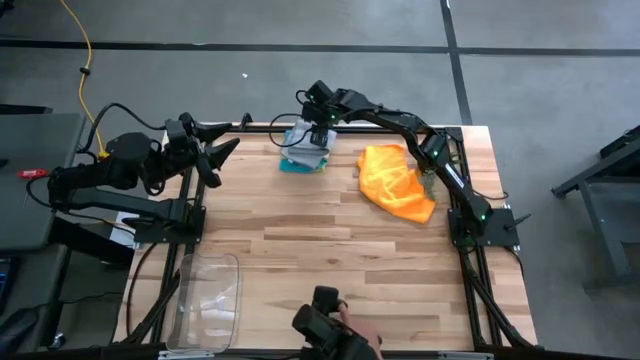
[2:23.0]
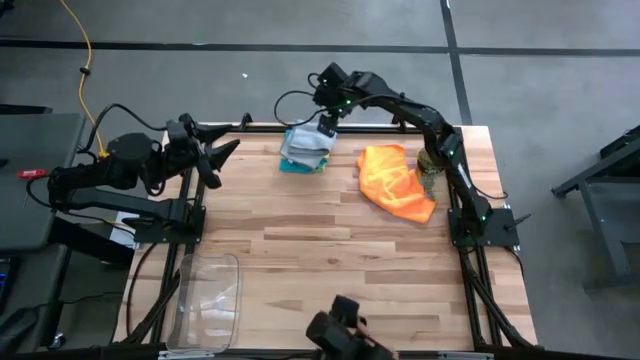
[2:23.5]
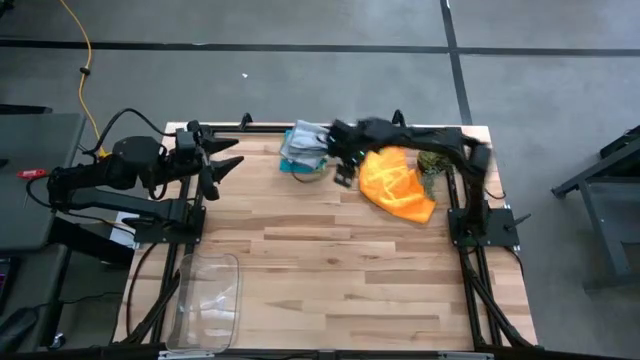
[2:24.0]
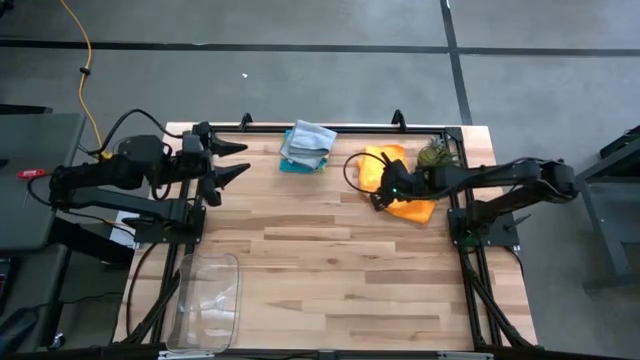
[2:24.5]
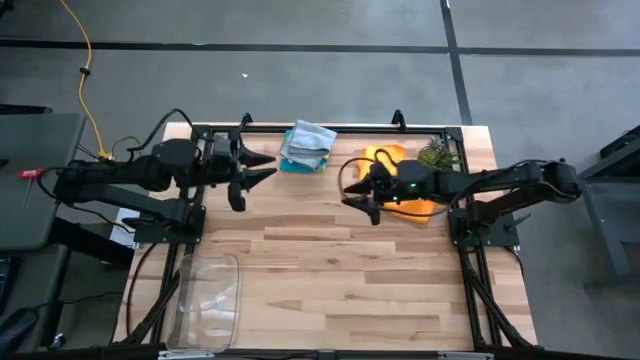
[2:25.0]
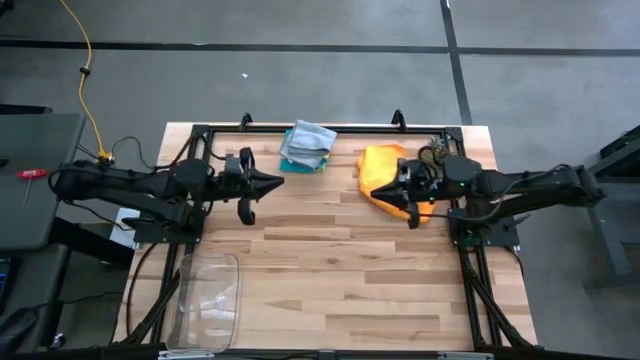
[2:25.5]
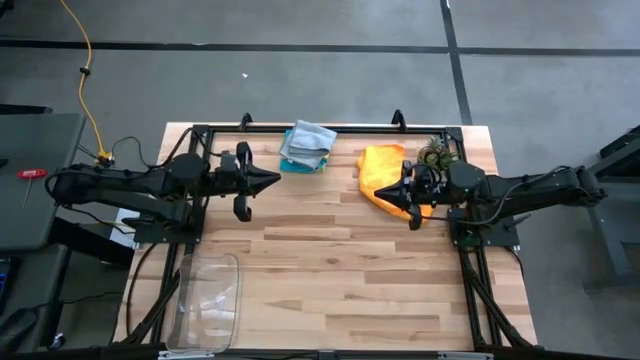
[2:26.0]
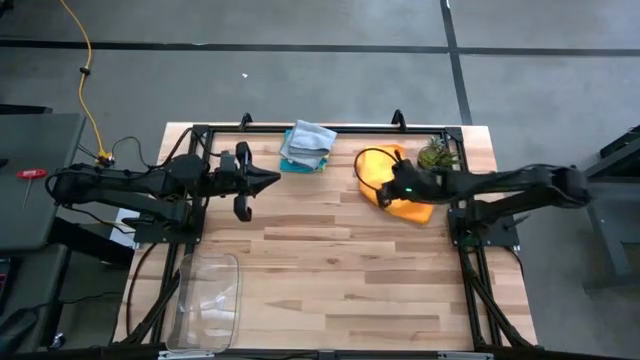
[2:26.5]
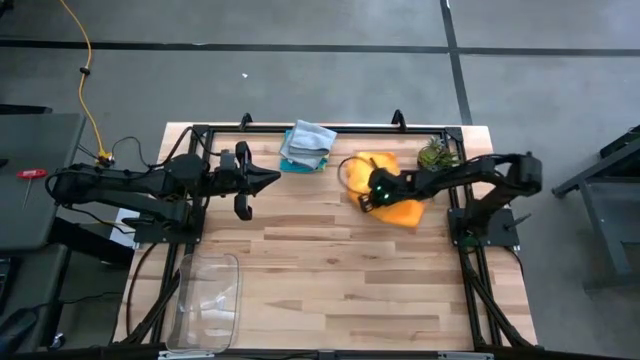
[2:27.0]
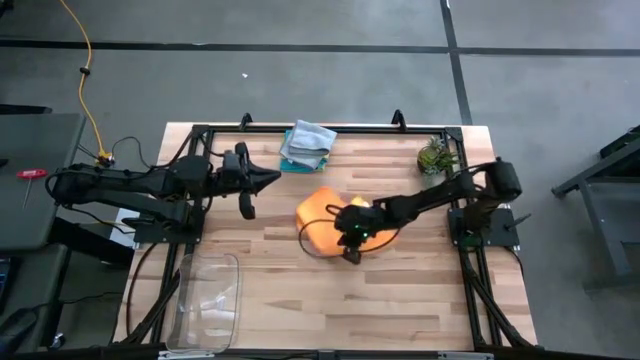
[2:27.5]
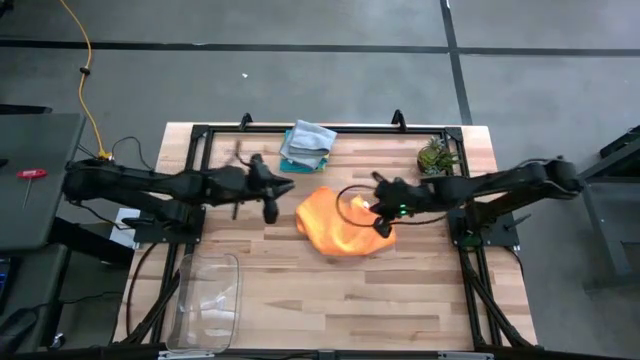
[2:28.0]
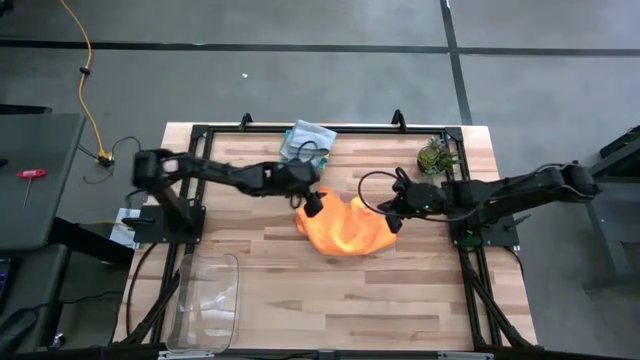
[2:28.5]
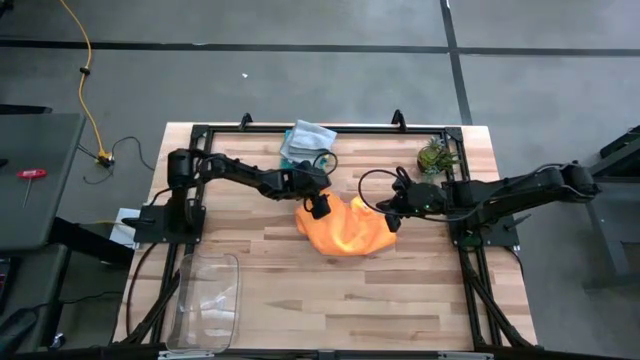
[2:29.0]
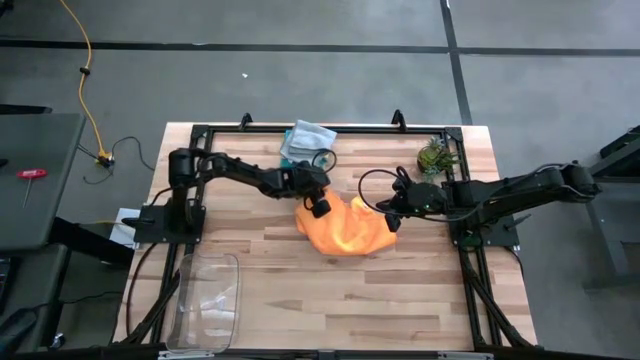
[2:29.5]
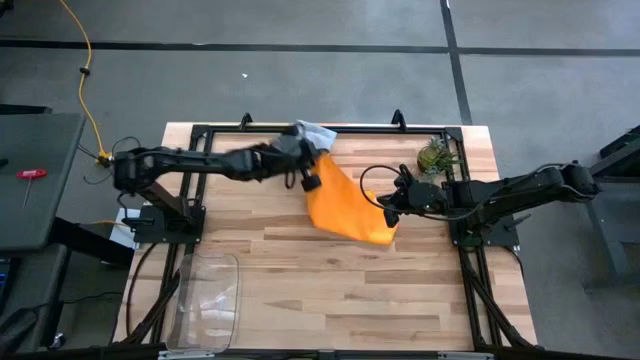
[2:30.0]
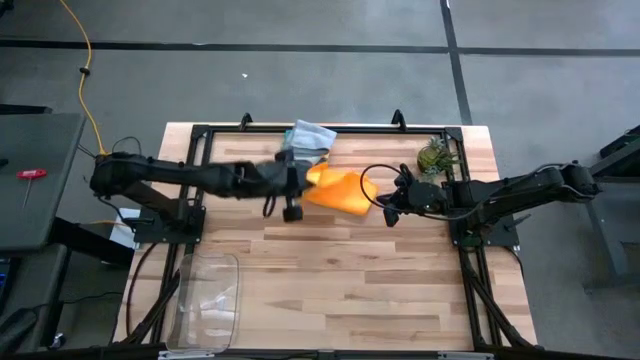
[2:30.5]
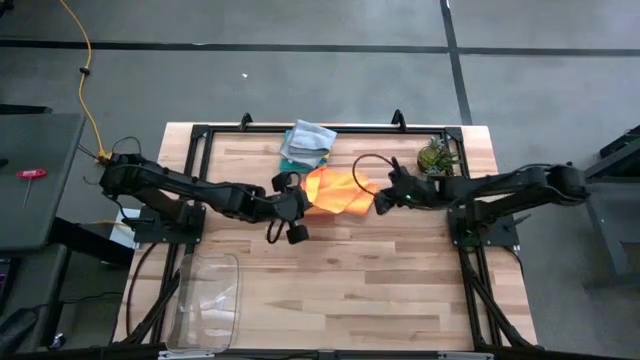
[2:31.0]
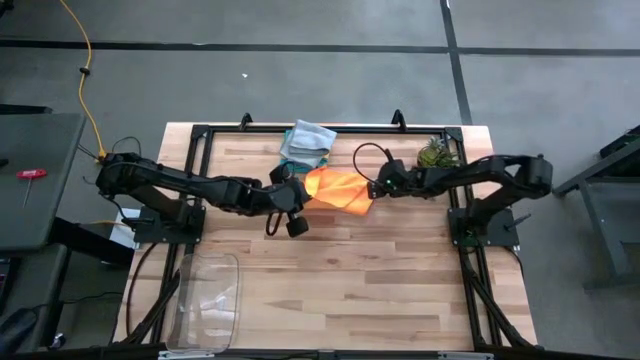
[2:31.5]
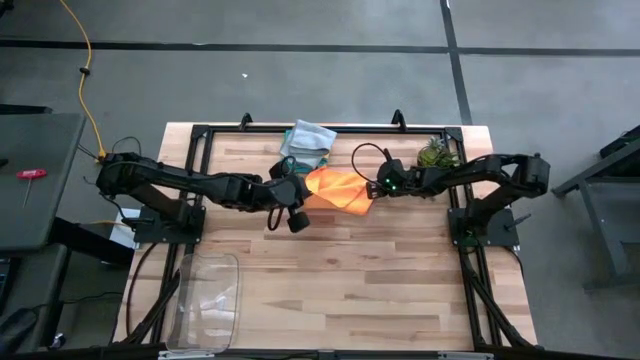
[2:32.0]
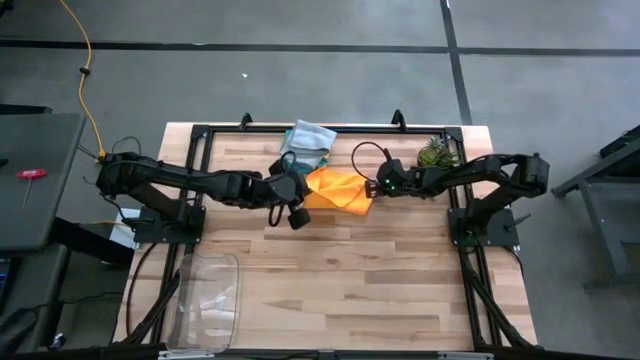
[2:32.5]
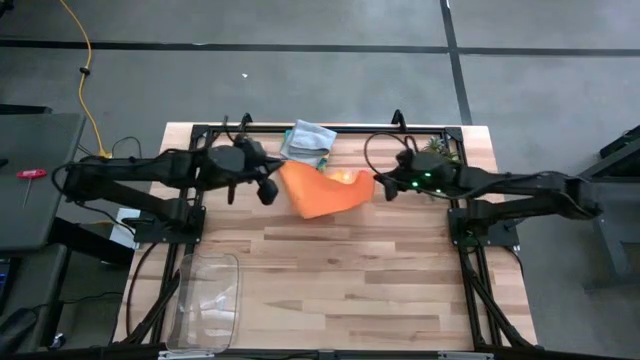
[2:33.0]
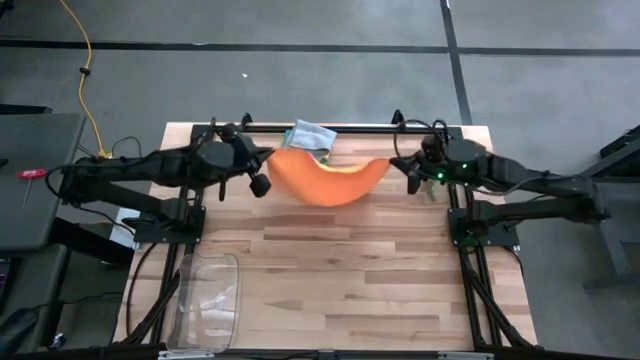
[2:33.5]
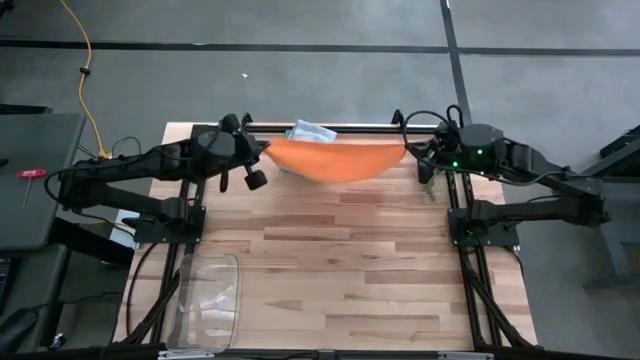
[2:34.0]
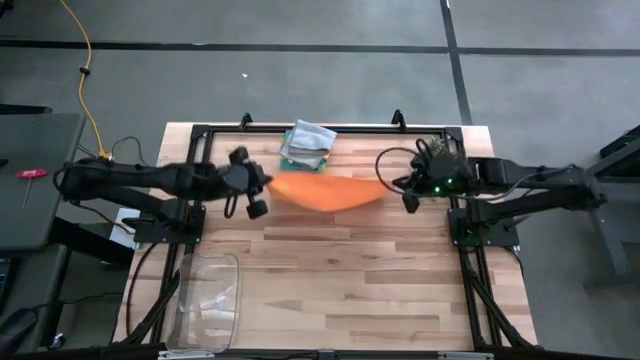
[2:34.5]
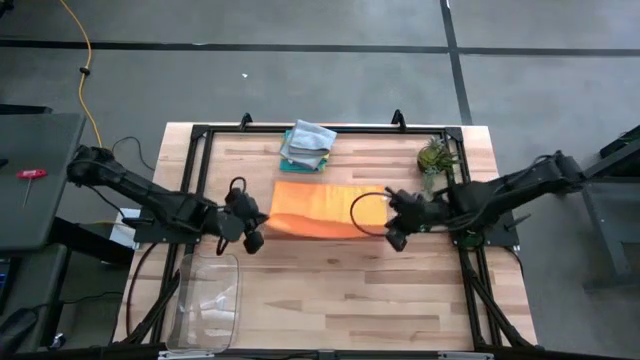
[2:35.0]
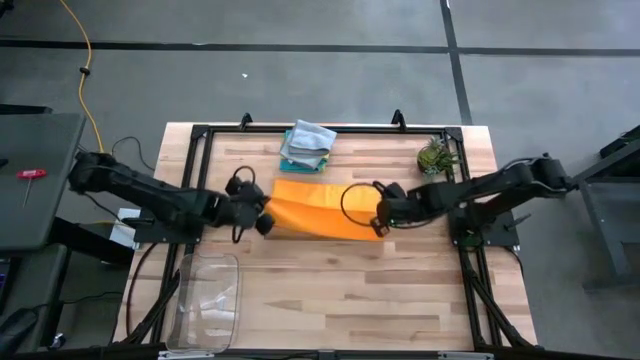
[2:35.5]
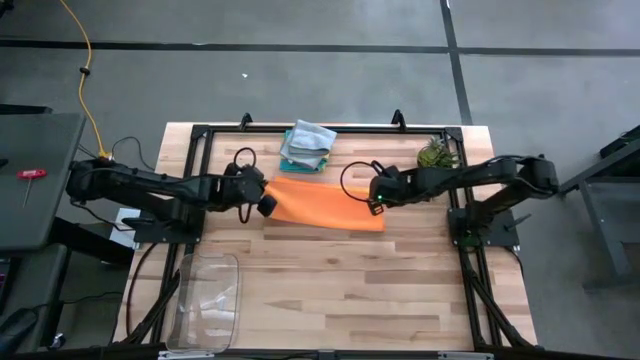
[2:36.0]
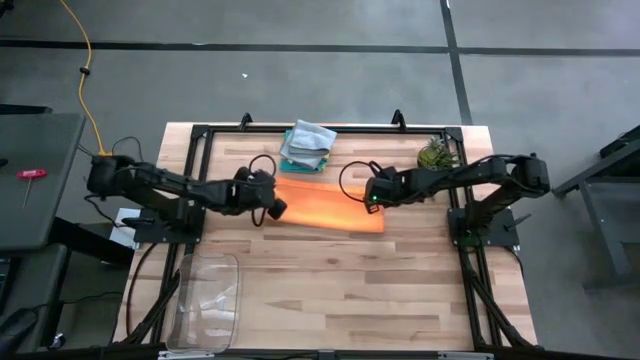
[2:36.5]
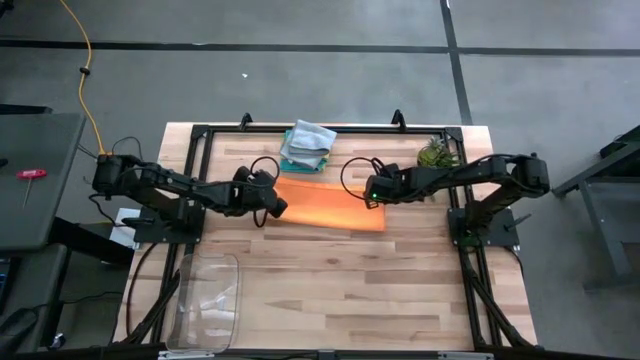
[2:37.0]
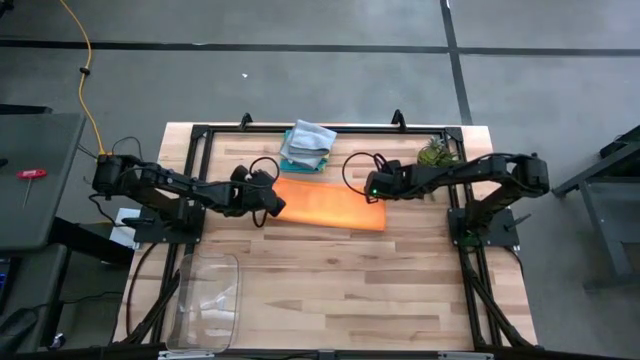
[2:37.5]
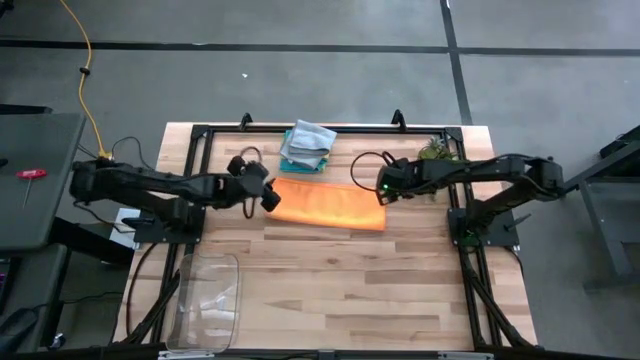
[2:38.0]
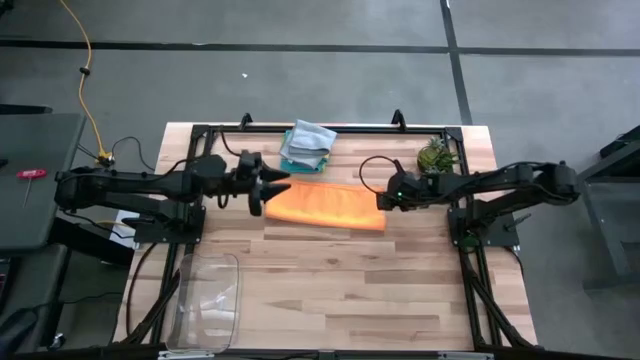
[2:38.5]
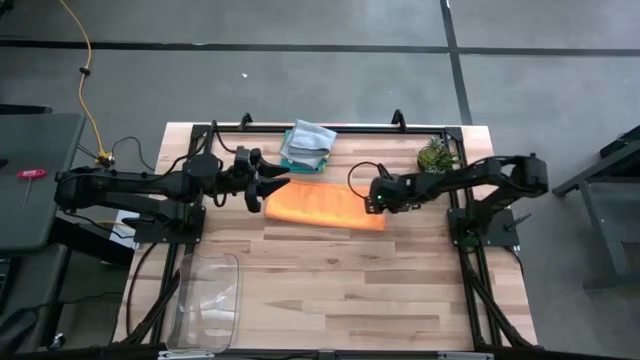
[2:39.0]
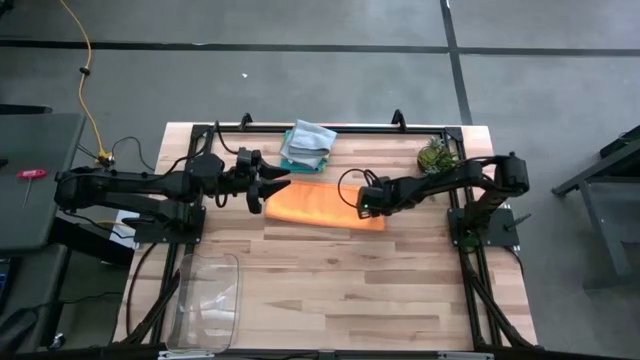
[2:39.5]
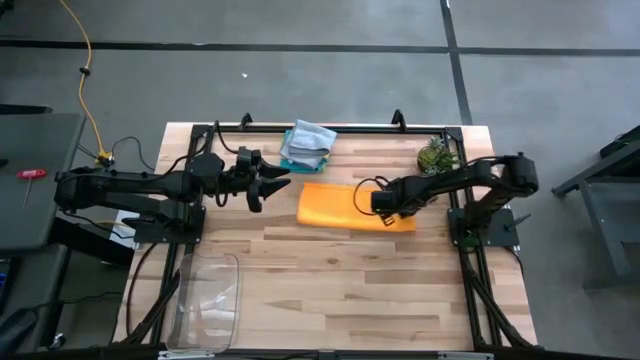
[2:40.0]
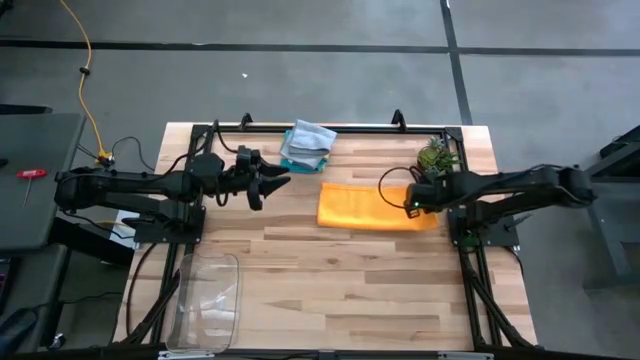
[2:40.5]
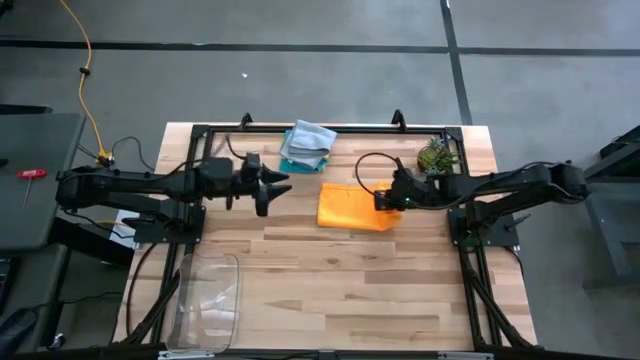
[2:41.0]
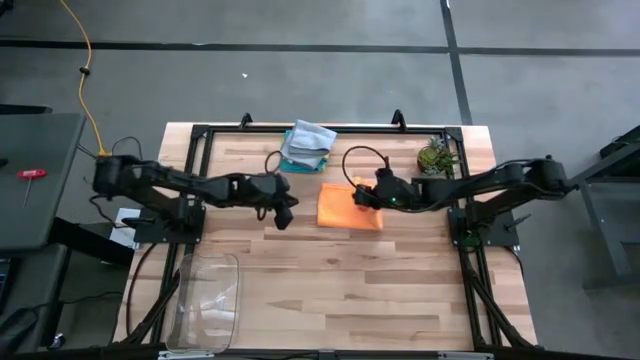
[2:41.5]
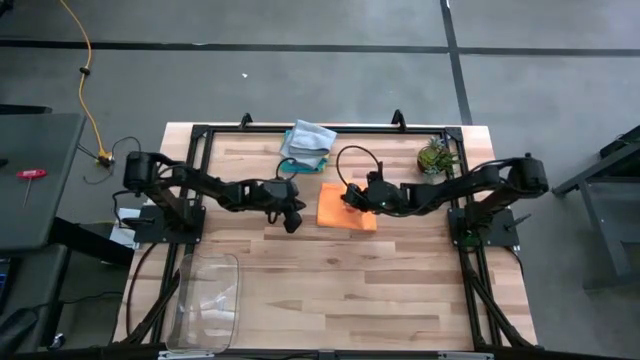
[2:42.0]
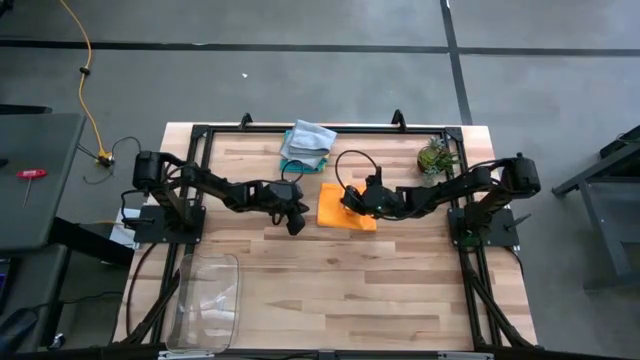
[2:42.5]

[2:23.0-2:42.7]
Task: Fold microfiber towels
Fold the orange microfiber towel

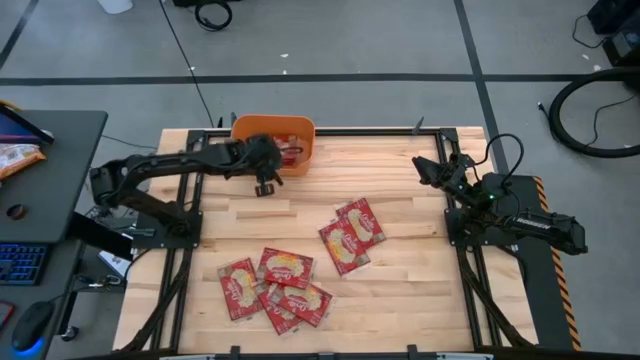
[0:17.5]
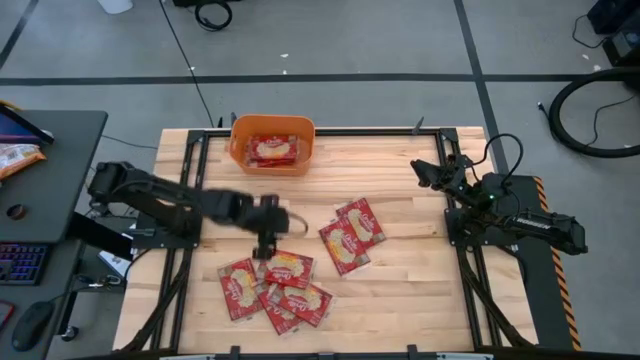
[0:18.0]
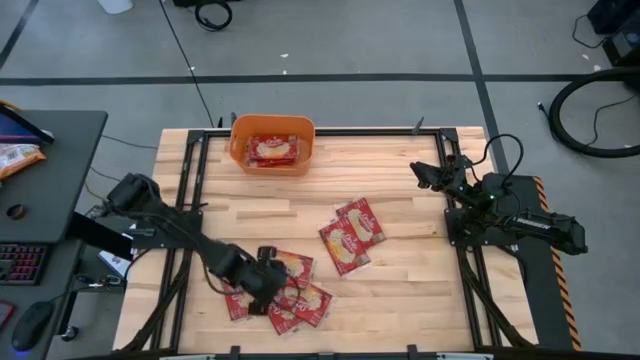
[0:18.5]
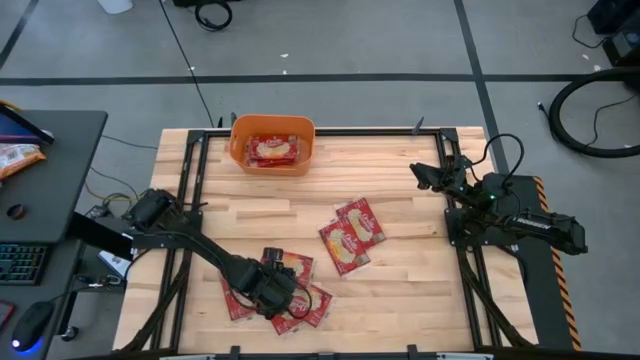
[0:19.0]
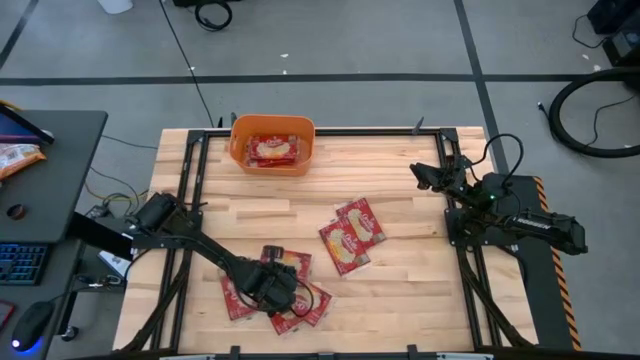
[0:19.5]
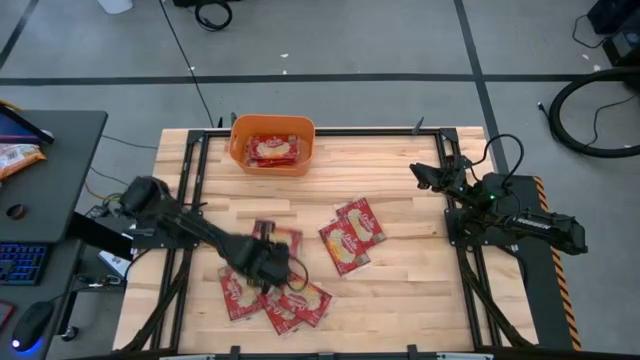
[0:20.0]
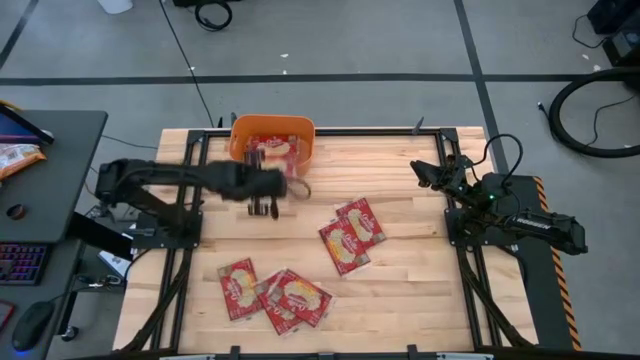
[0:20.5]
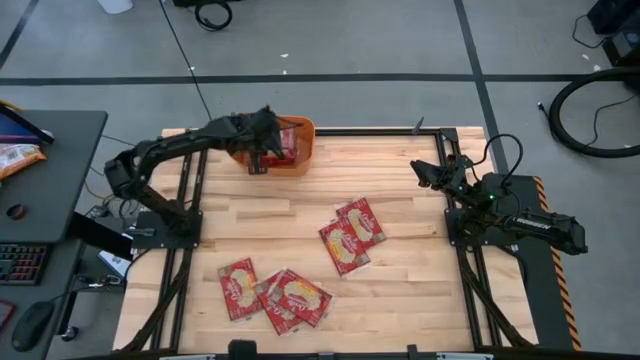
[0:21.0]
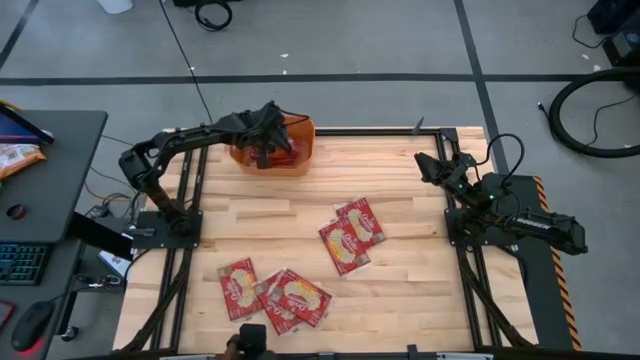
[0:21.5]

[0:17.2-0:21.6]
Task: Sort popcorn bags into baskets
Put the popcorn bag into the orange bin
